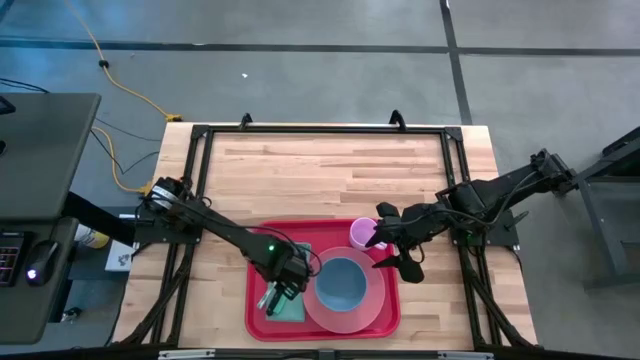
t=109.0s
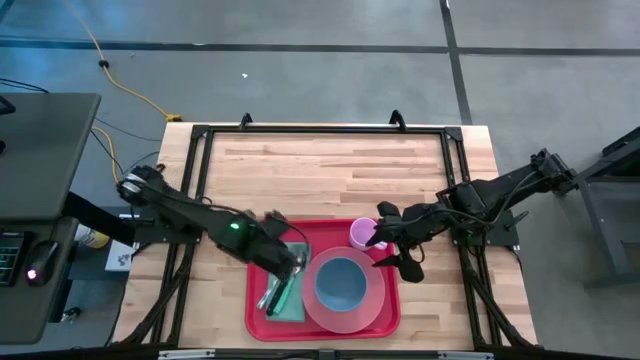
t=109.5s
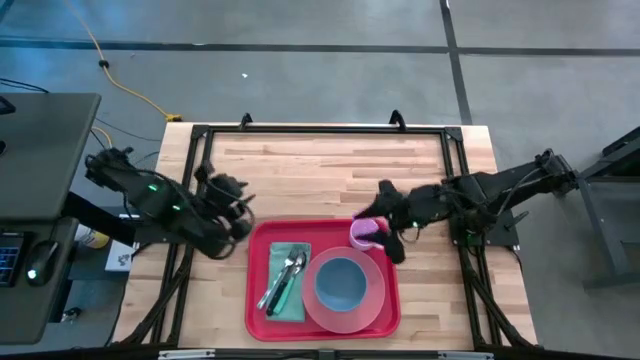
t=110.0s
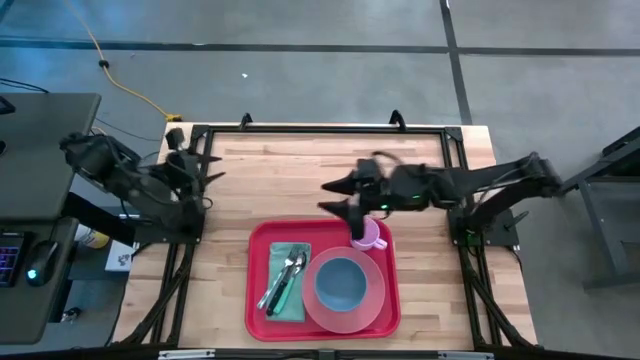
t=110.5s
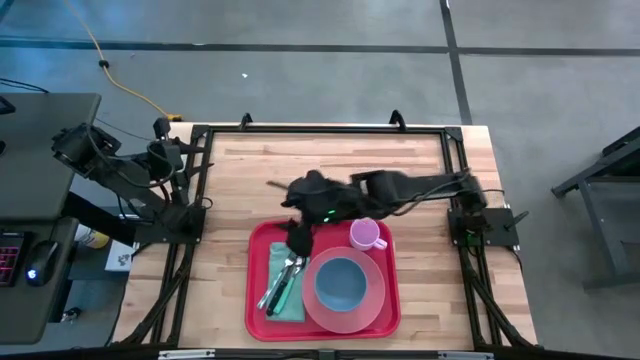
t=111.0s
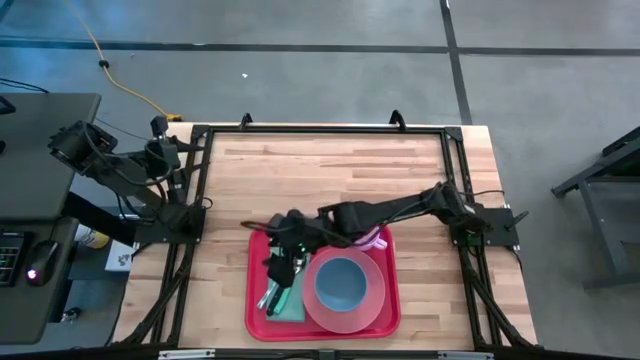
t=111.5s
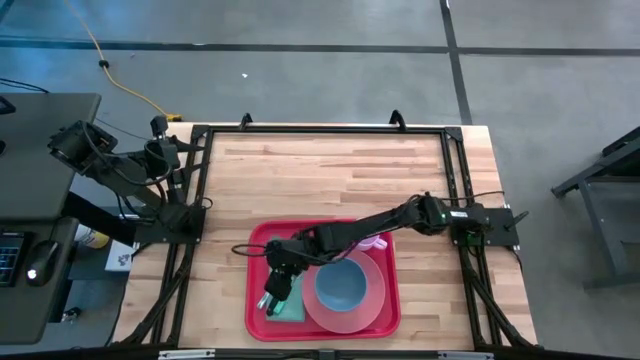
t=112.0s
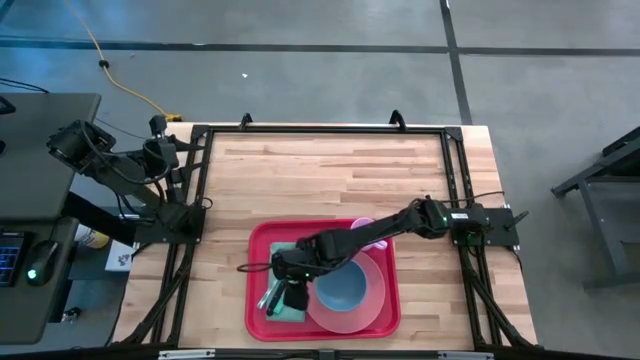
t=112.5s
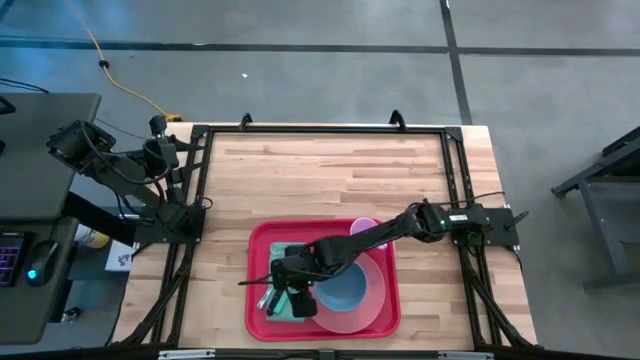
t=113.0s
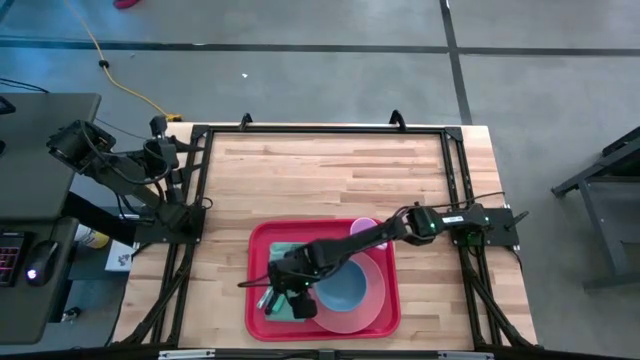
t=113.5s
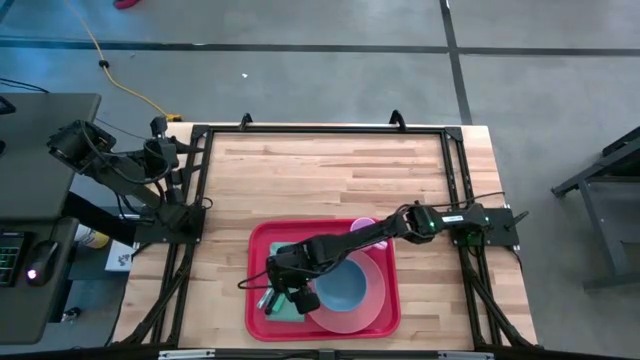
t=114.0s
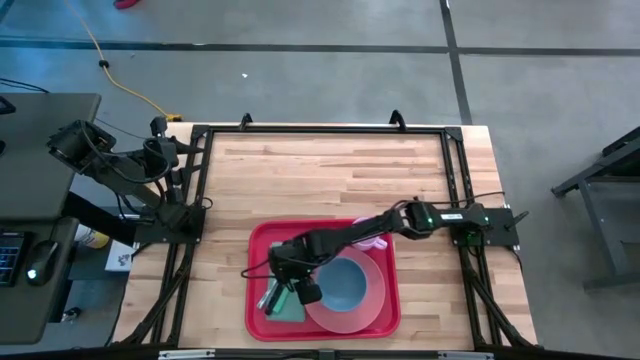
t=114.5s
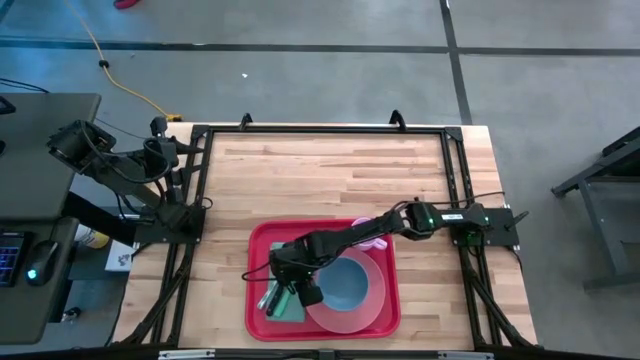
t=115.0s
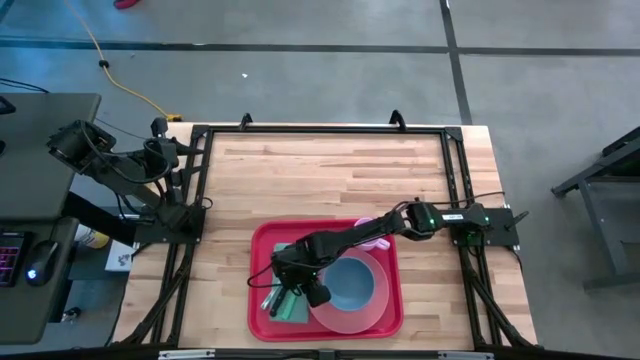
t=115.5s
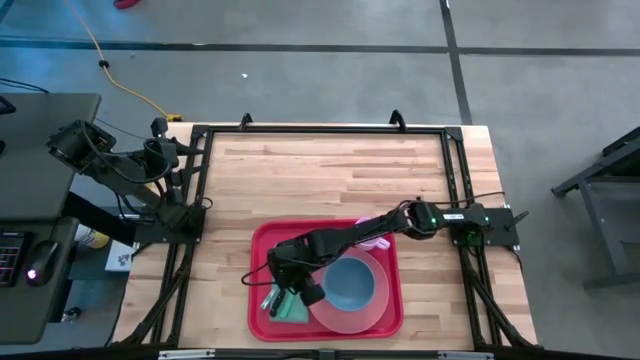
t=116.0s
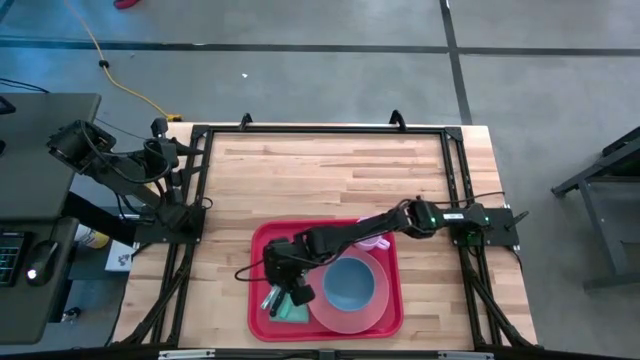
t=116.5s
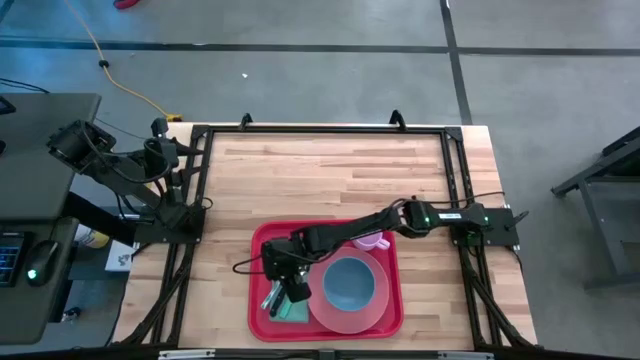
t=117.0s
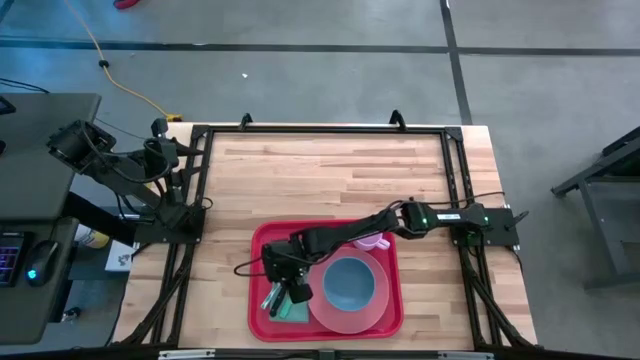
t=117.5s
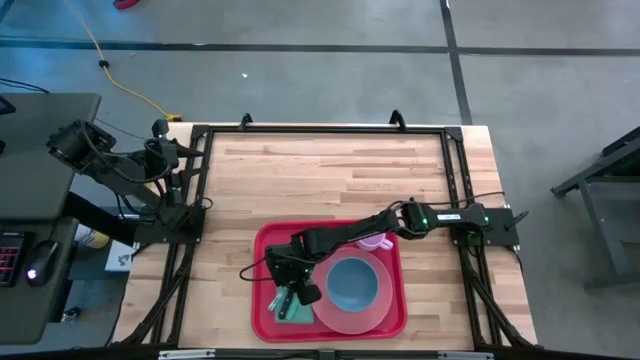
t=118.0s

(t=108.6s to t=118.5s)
Task: Set up tray
Adjust the silverwares on top of the light blue table napkin

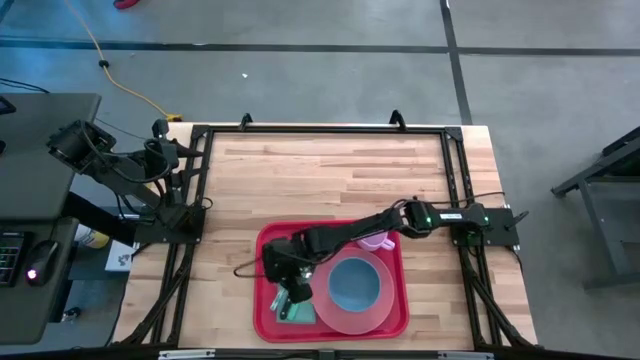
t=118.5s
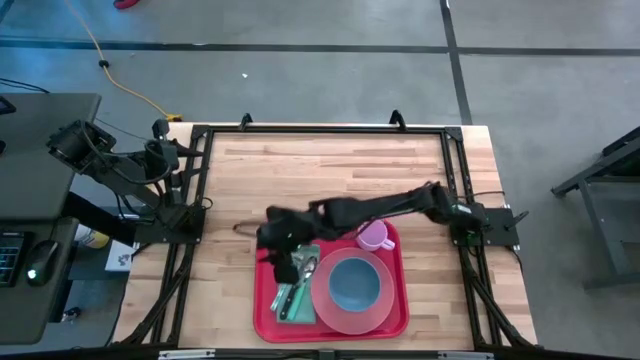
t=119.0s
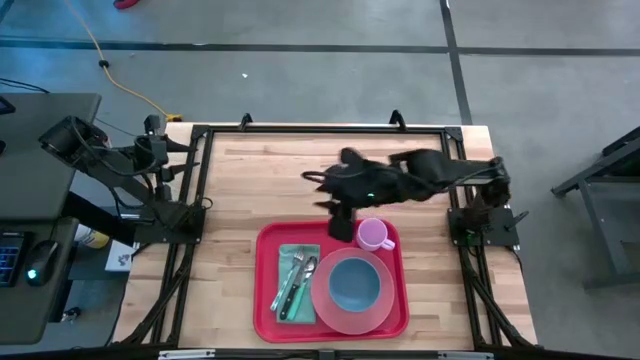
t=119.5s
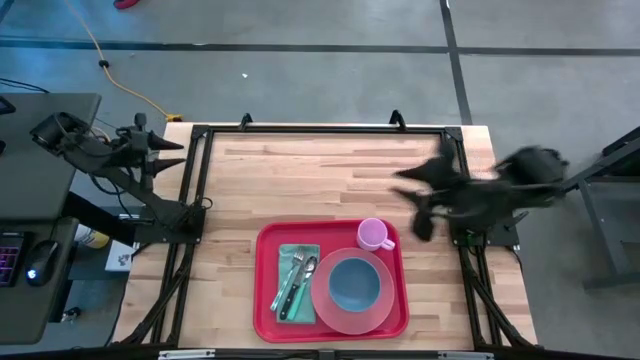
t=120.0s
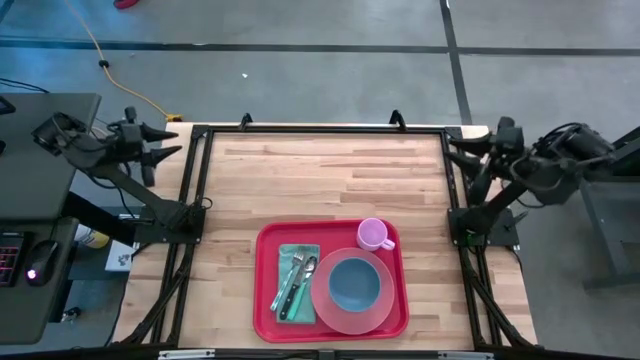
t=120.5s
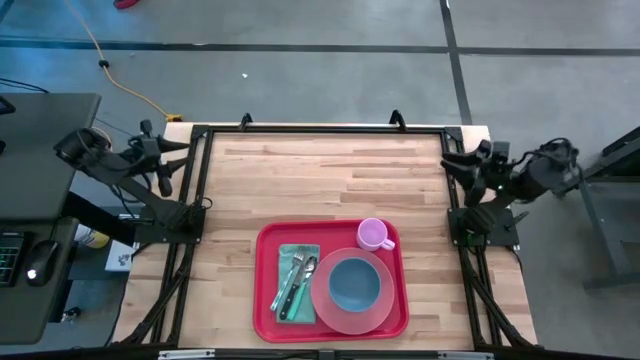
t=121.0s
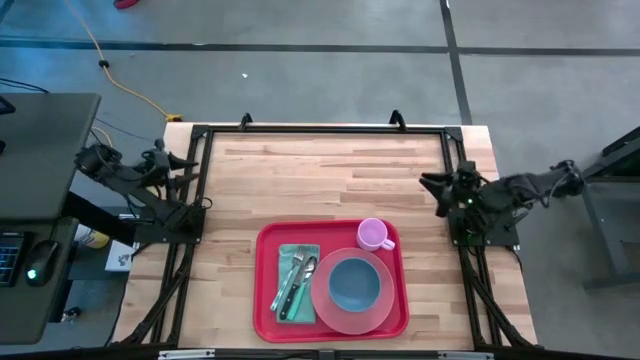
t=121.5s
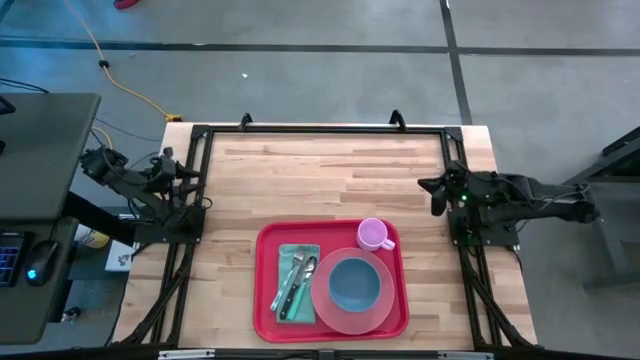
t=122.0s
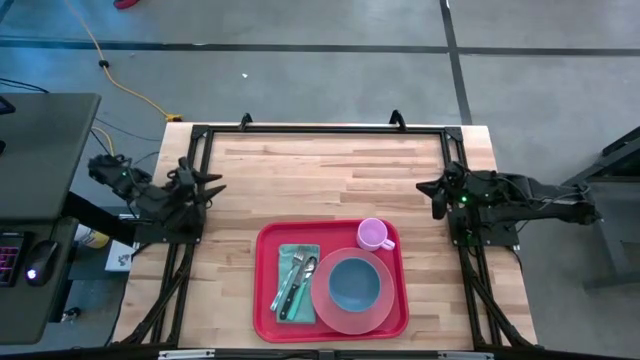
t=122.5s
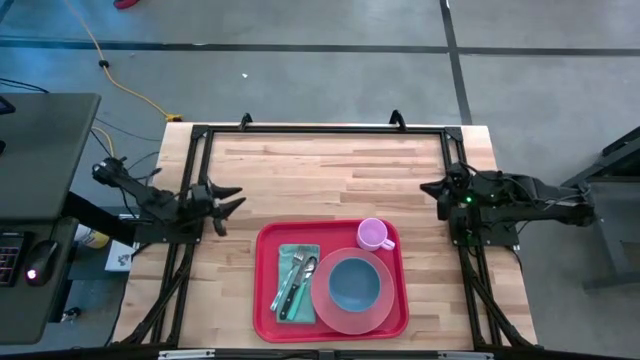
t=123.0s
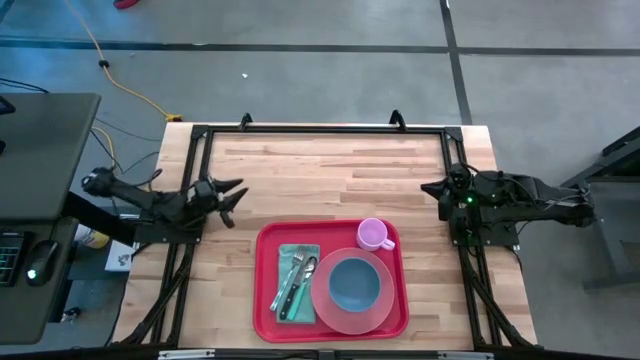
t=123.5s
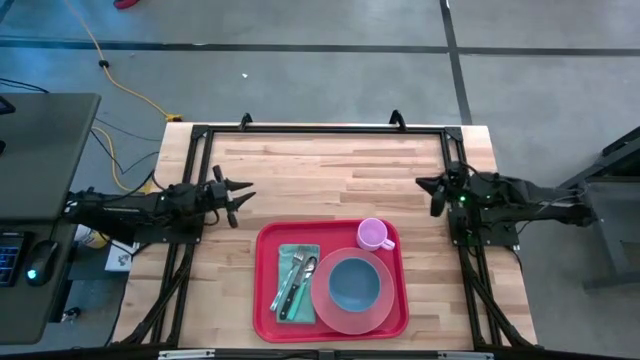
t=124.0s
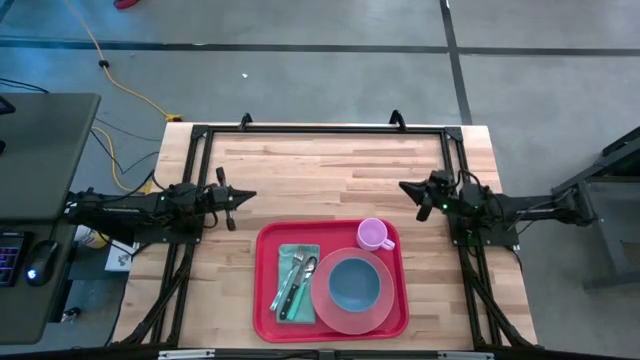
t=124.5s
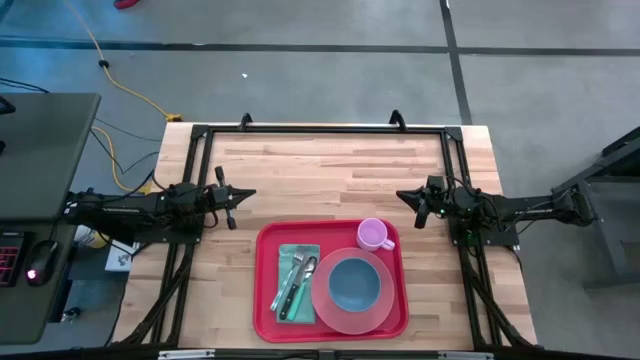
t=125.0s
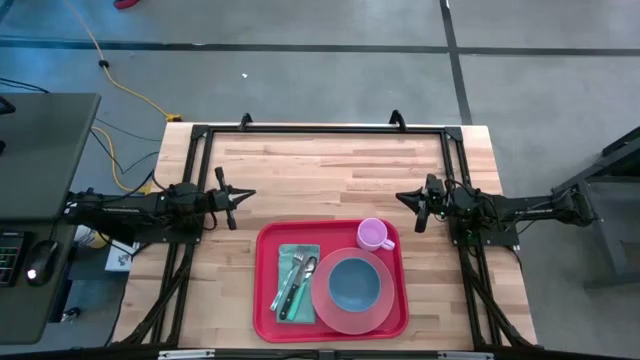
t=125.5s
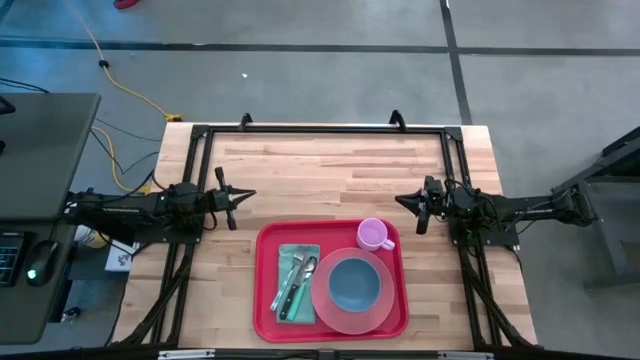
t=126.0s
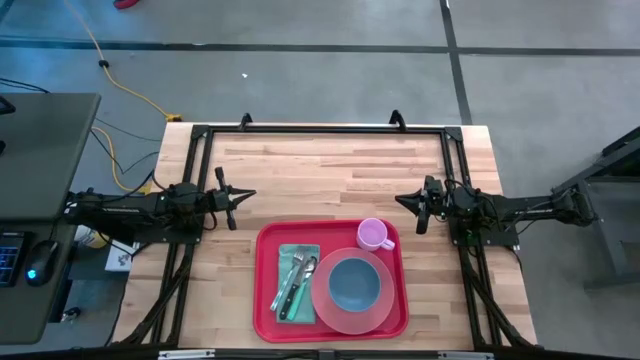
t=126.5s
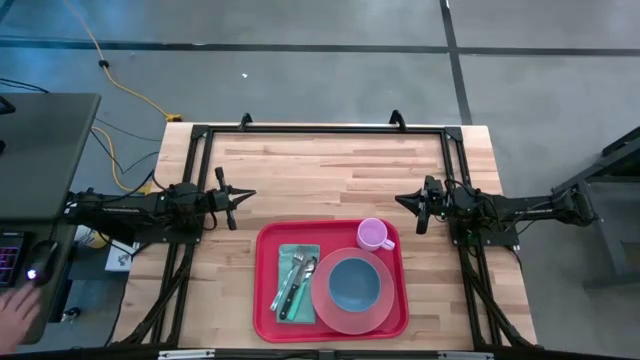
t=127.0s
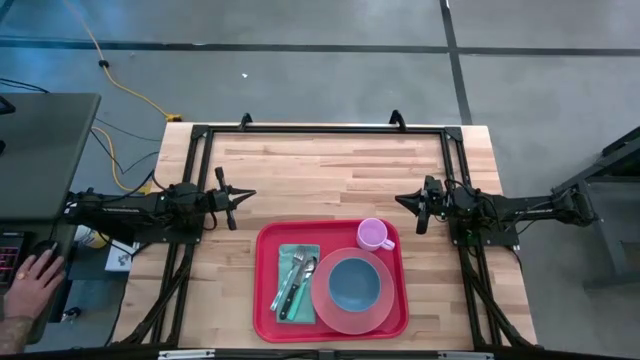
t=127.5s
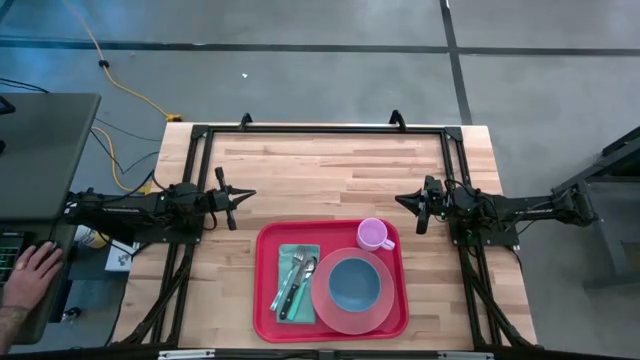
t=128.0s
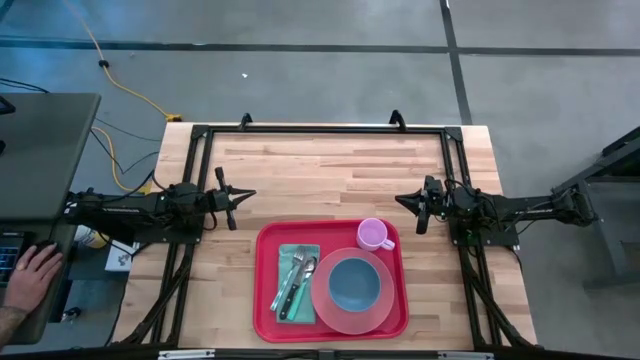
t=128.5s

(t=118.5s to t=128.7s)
Return to Home Position

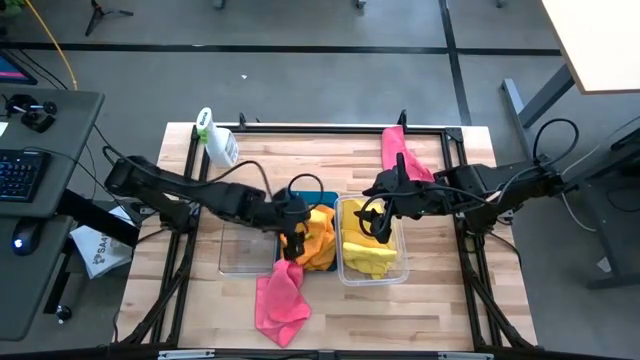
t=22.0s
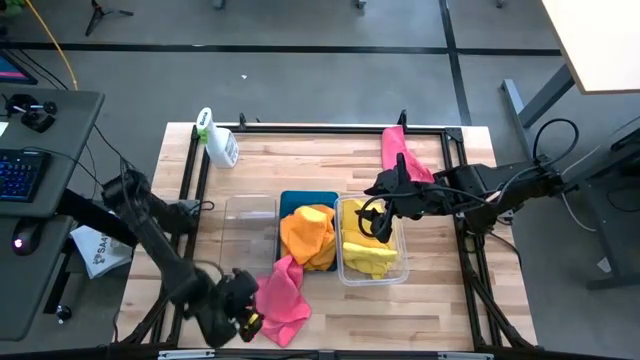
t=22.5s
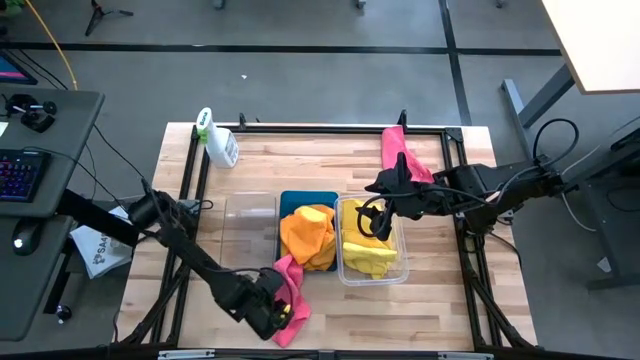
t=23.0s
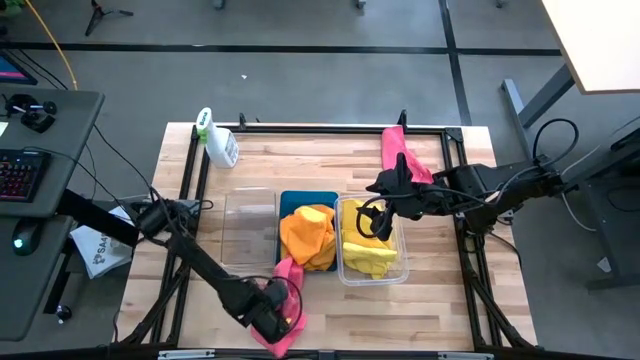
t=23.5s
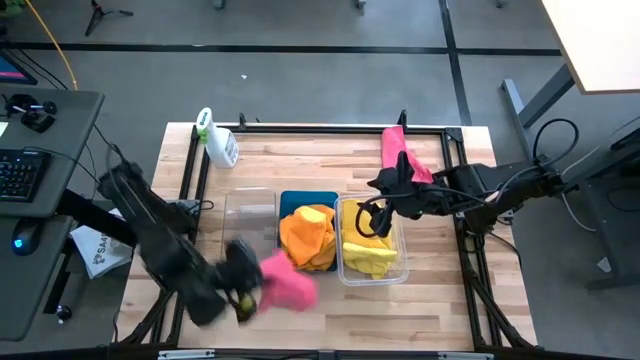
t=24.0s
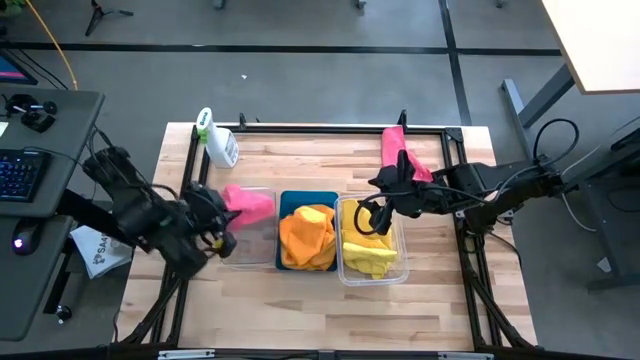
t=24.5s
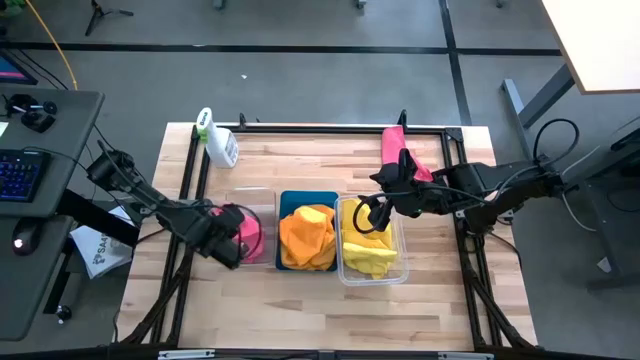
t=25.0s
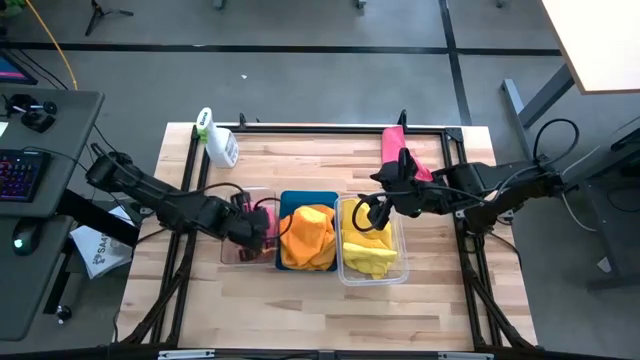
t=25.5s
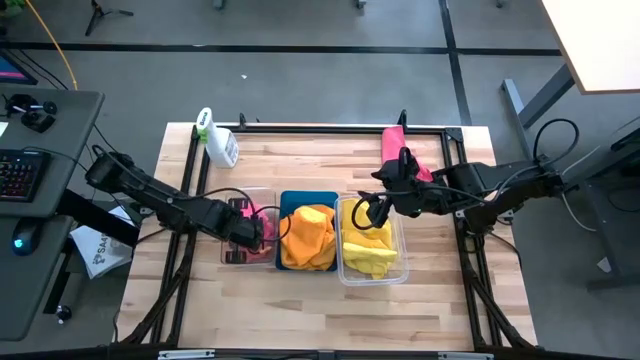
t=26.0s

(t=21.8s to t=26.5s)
Task: Sort microfiber towel by color & place in baskets
Put the bottom pink microfiber towel into the left transparent bin
